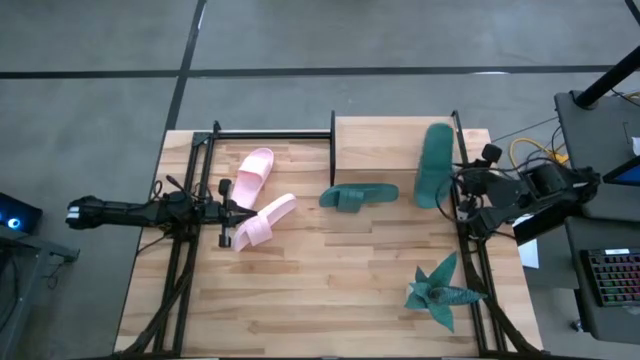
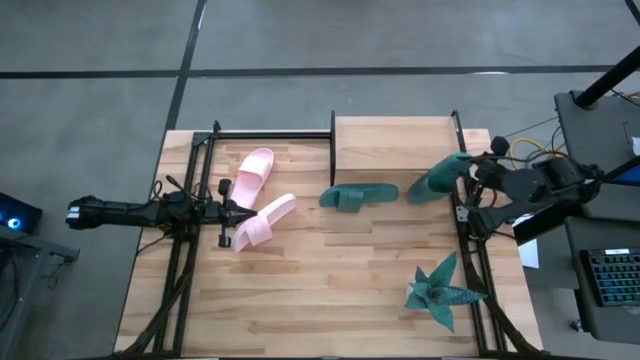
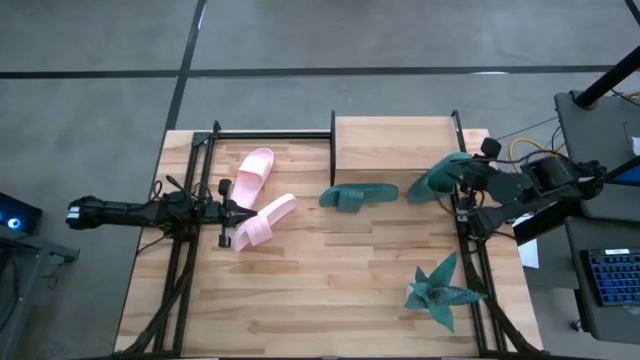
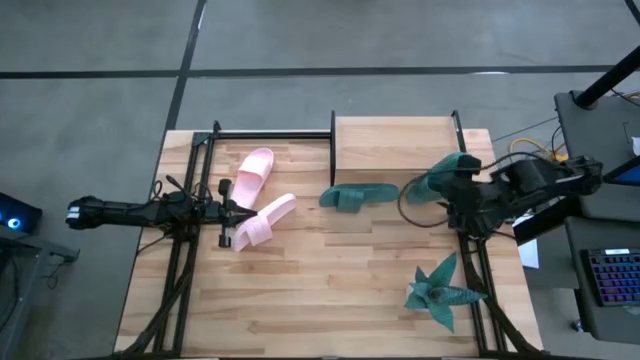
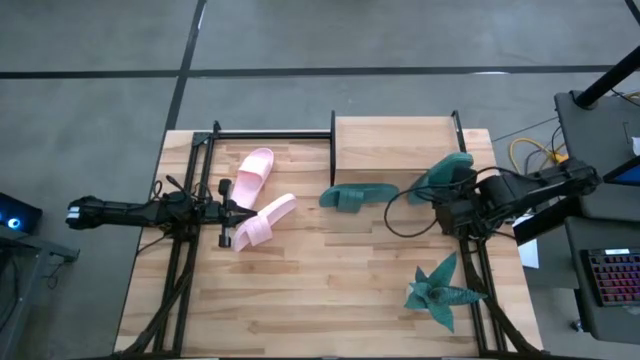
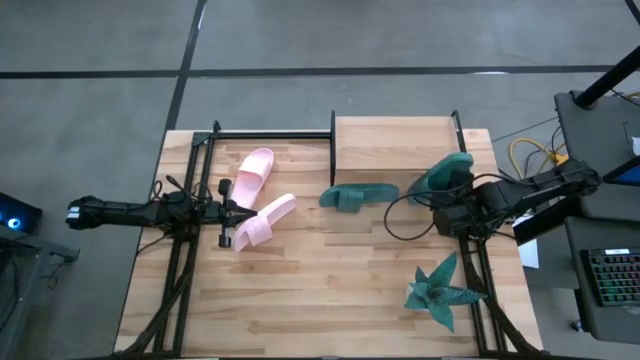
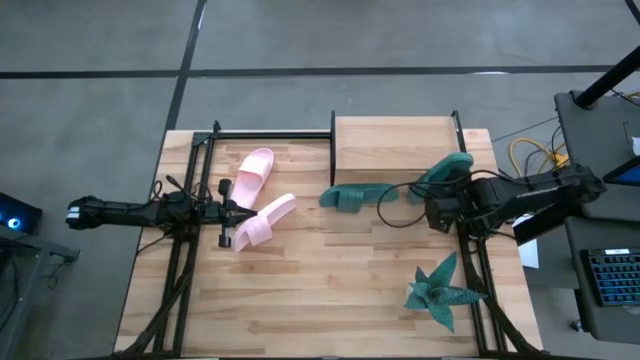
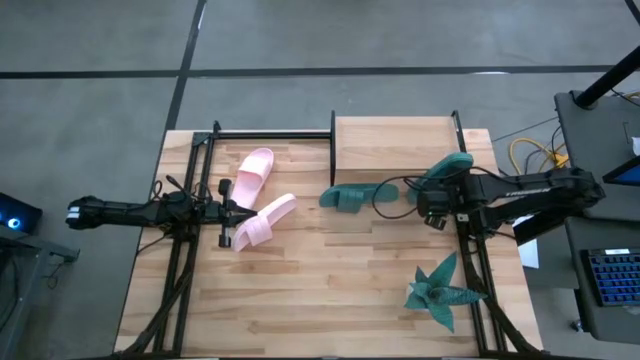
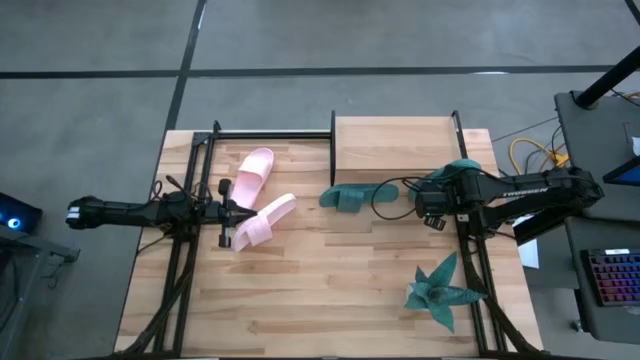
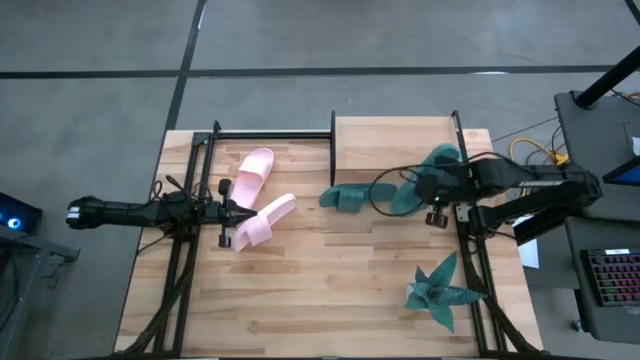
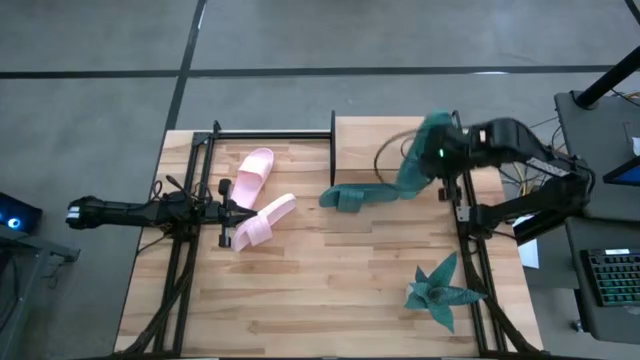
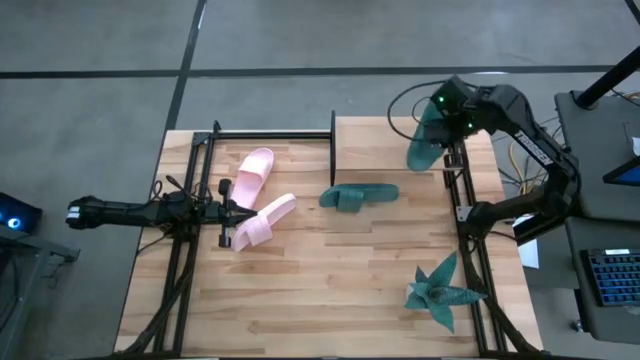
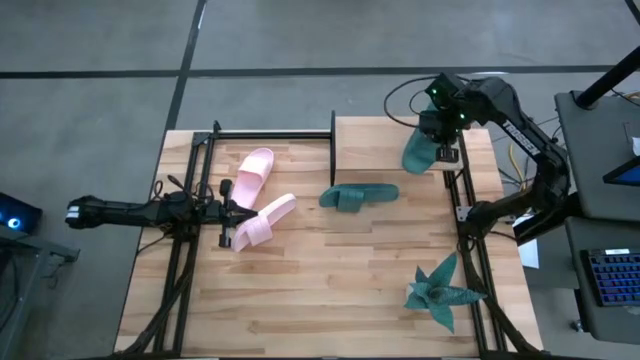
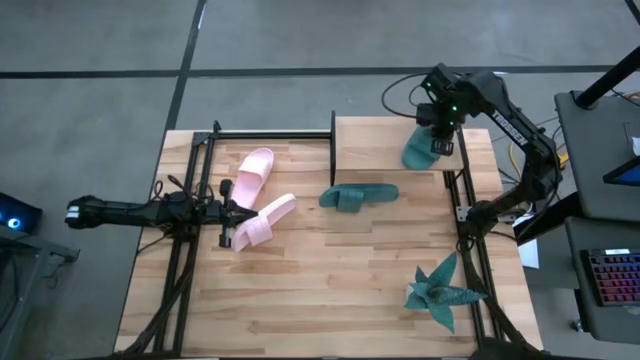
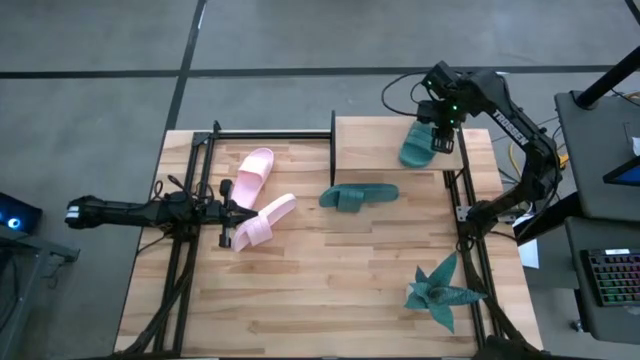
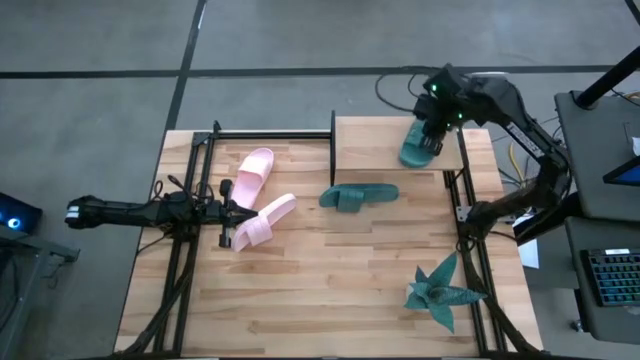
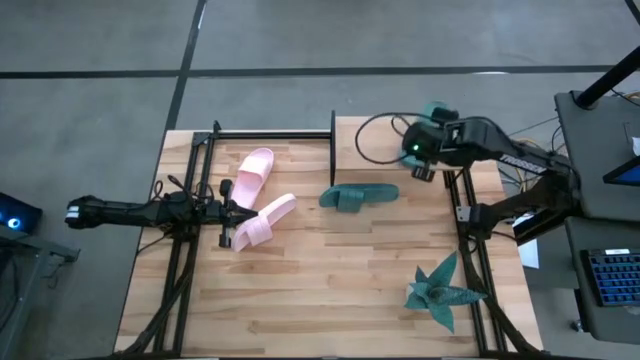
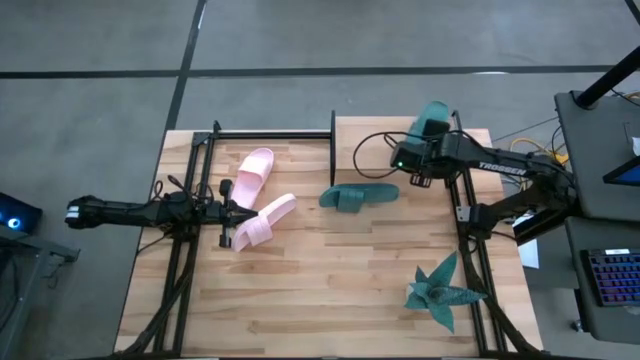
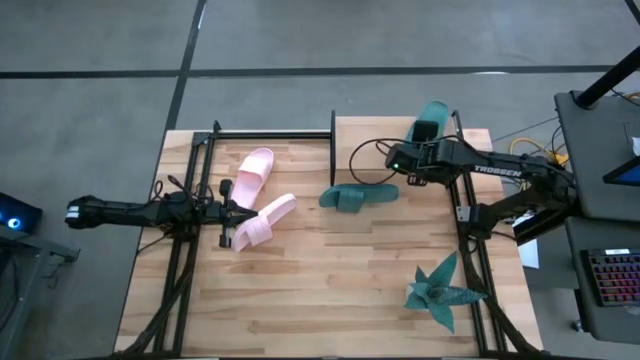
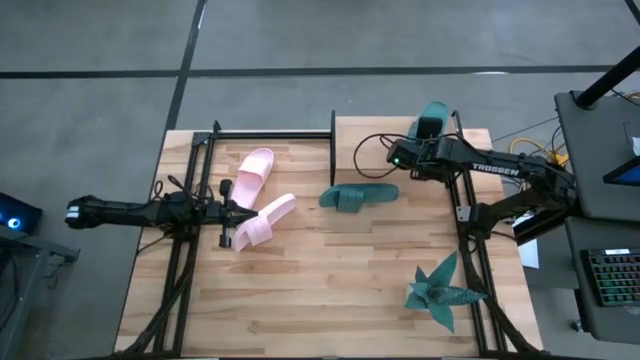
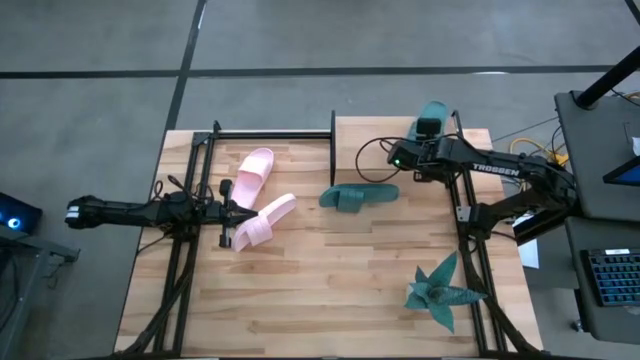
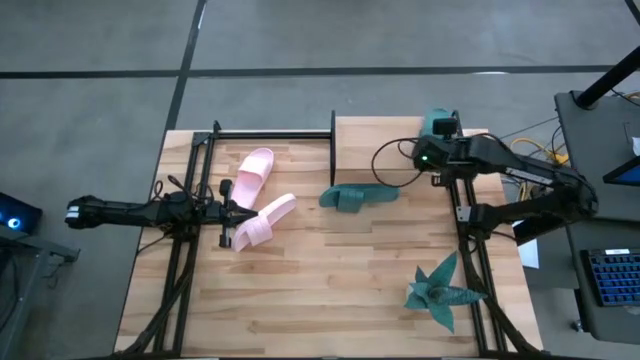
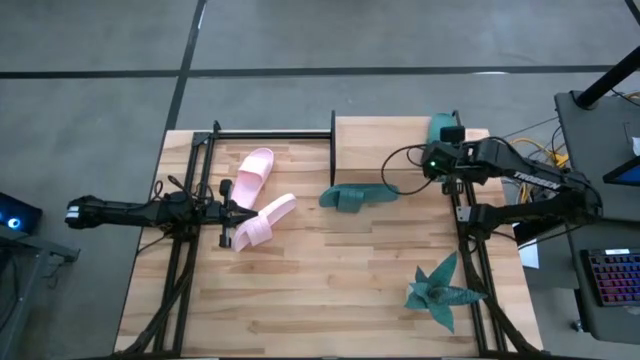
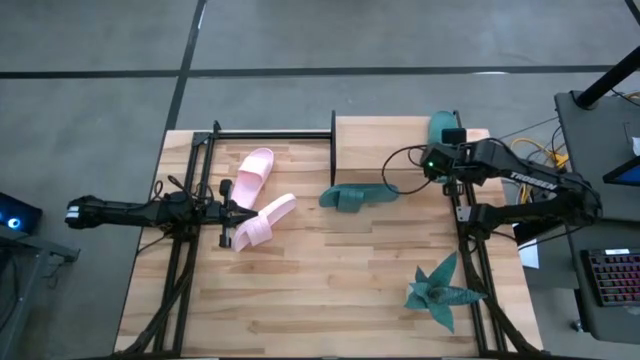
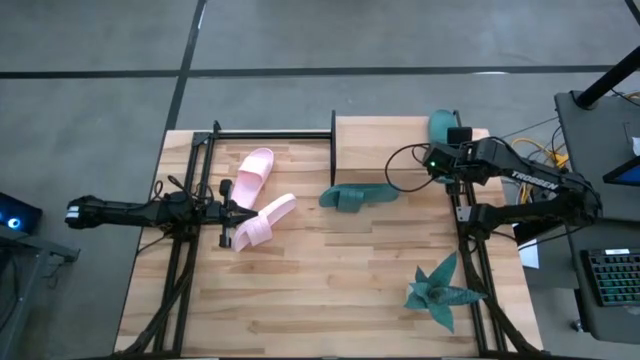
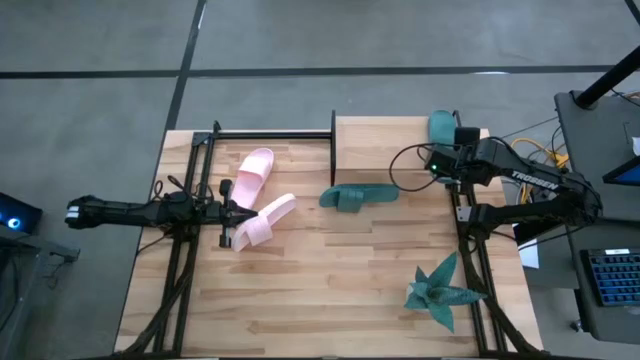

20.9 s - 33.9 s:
Task: Pick and place slides into the shelf
Put the right green slide on the shelf

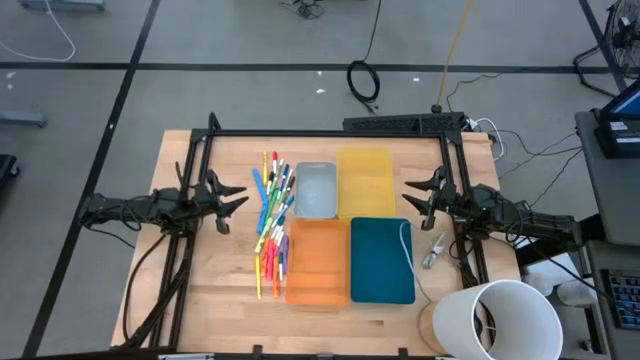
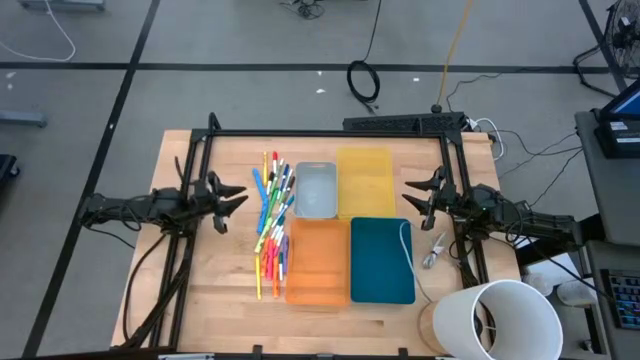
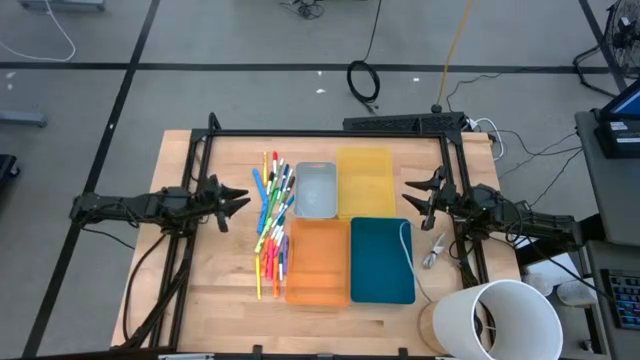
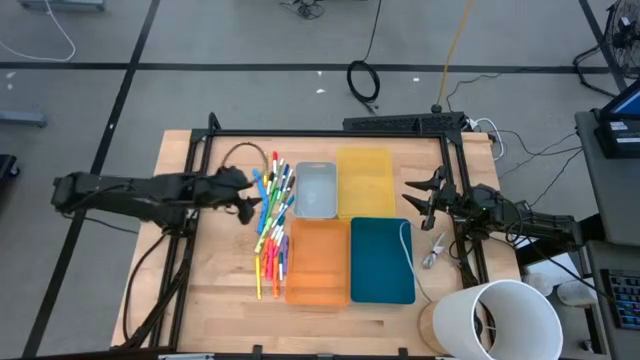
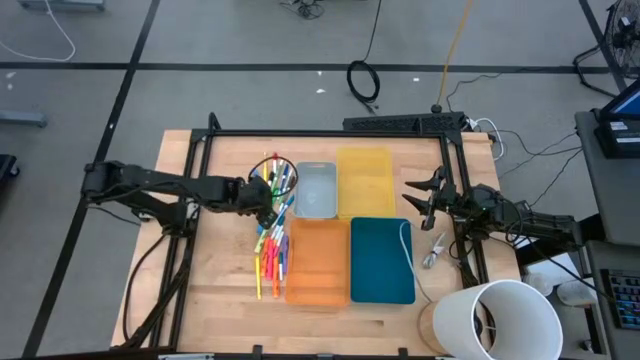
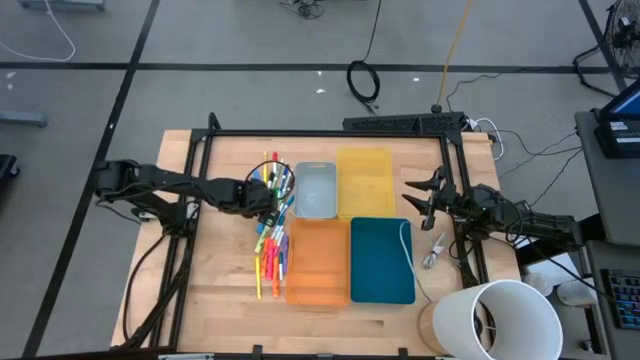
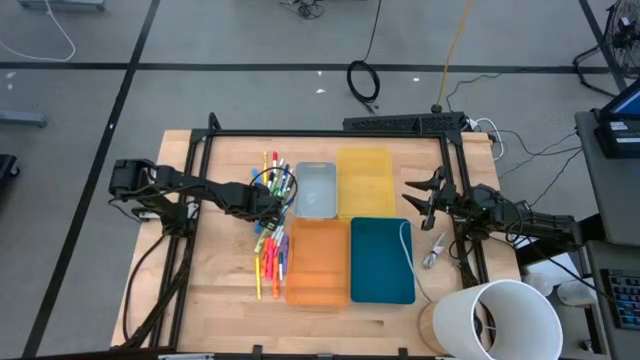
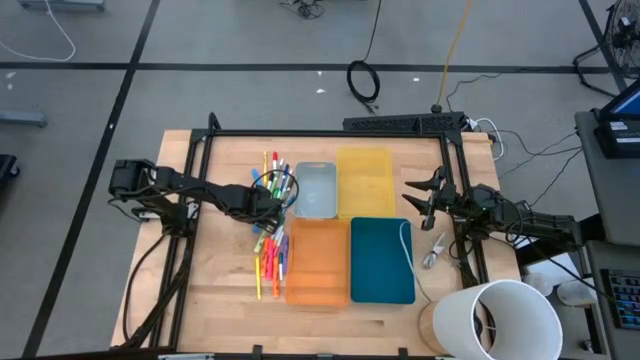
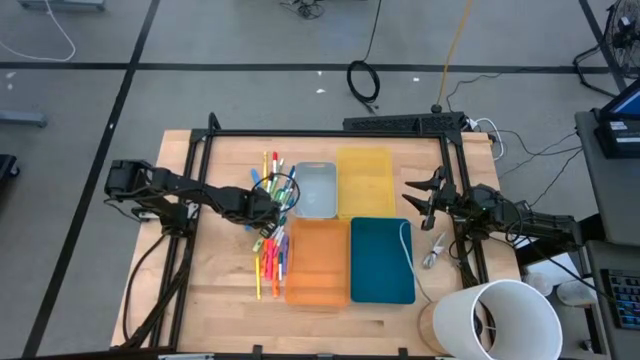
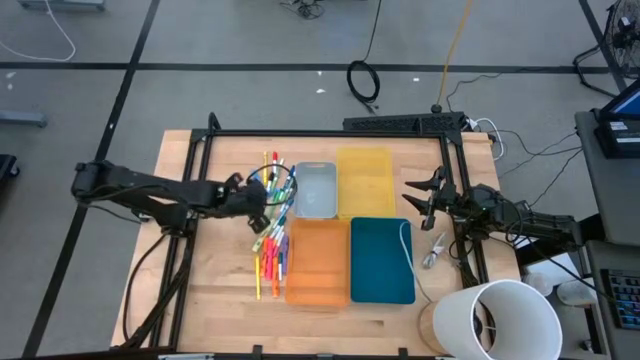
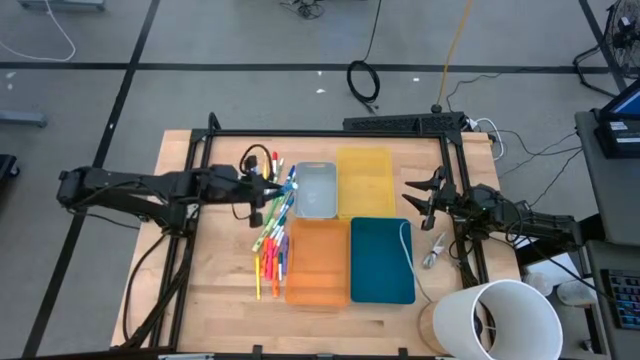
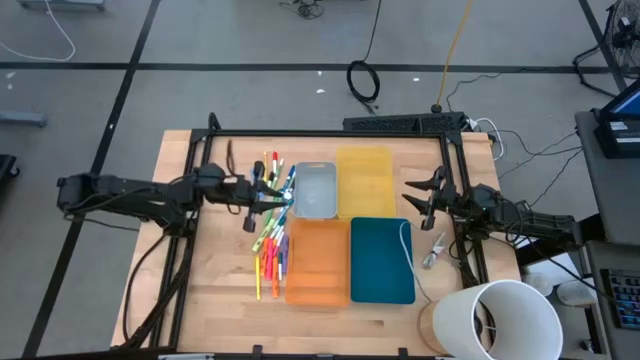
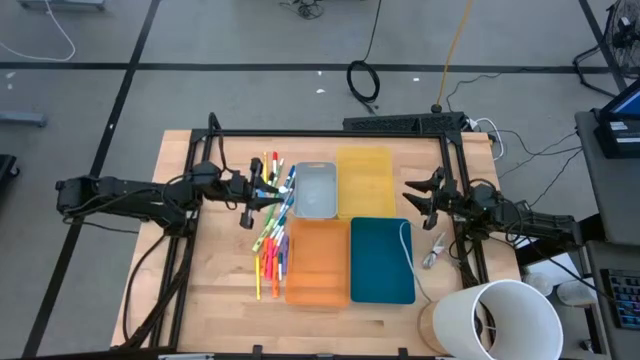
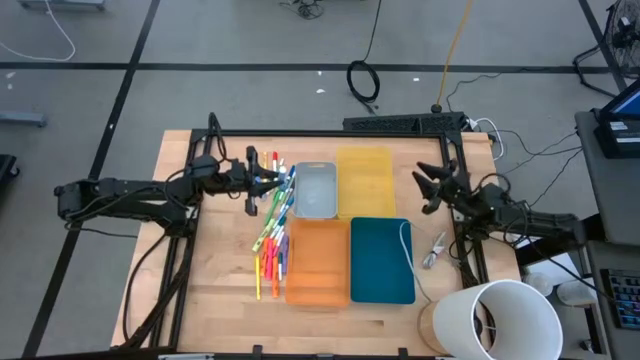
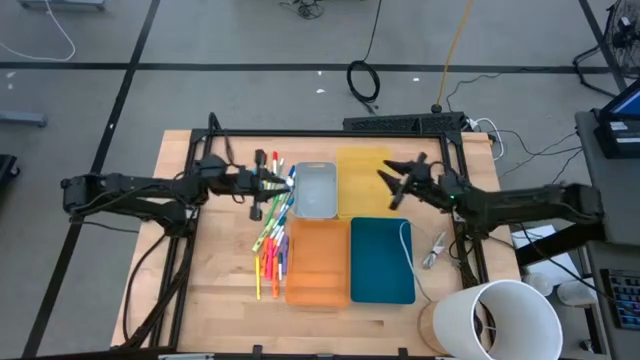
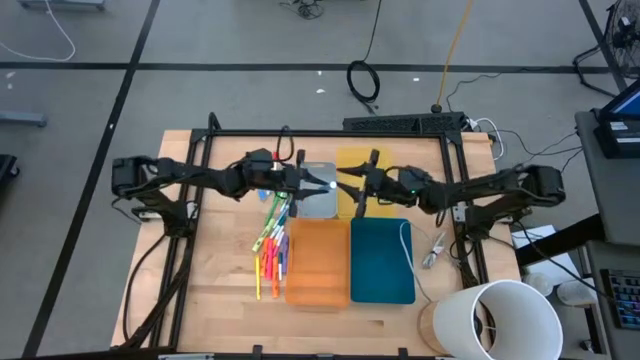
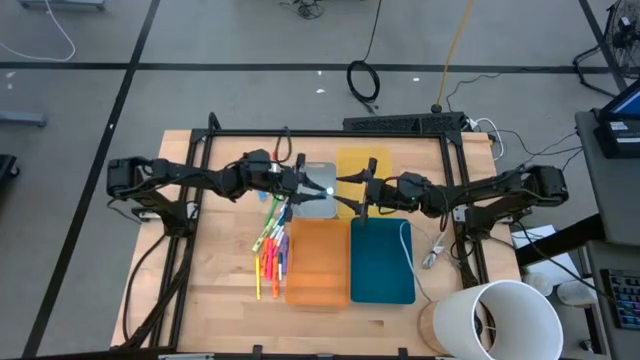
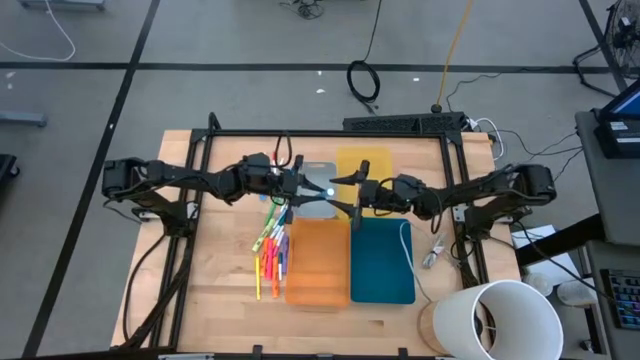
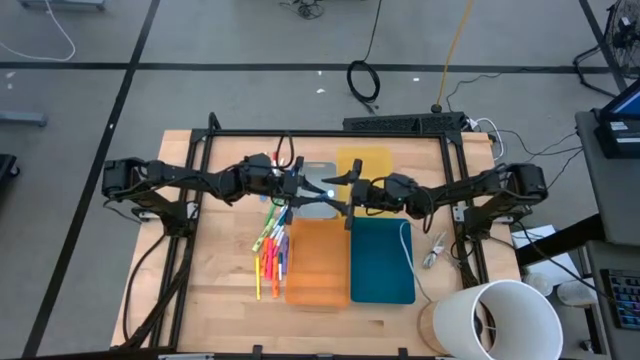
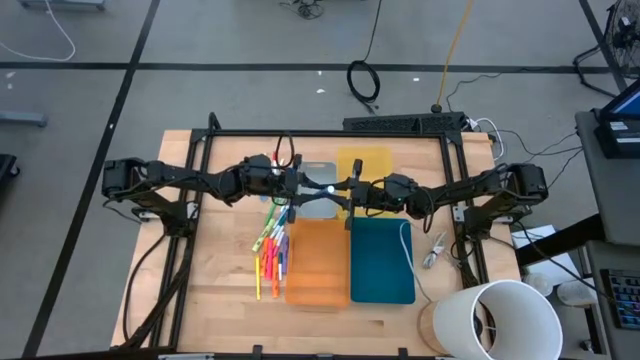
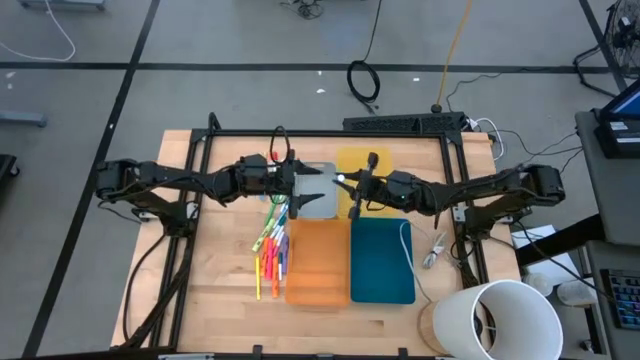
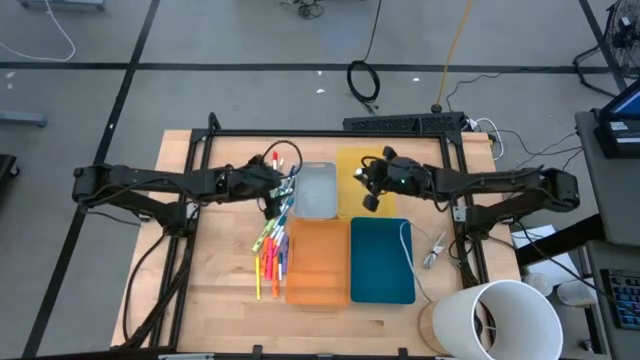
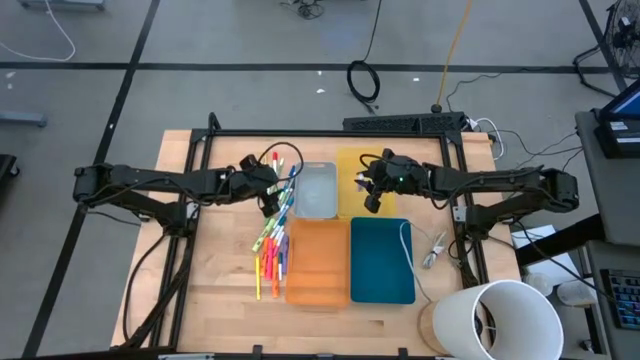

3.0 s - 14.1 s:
Task: Pick & Place Markers
Put the blue highlighter pen into the yellow bin
